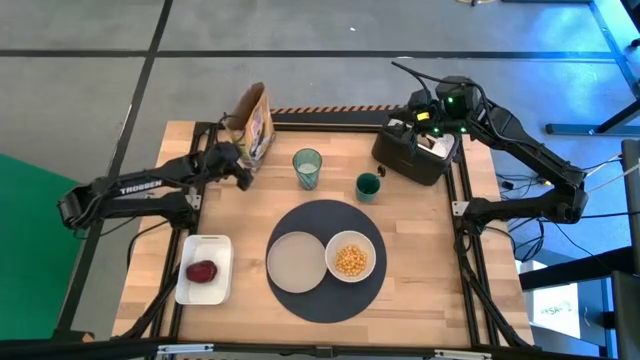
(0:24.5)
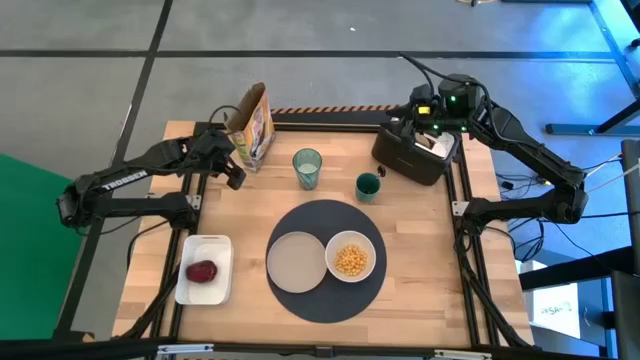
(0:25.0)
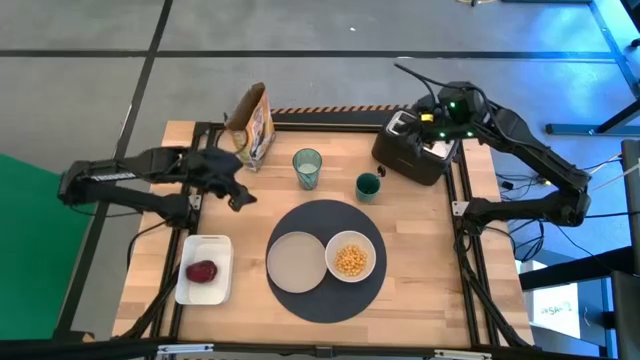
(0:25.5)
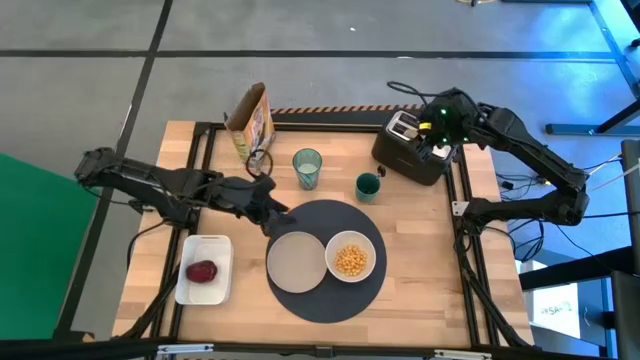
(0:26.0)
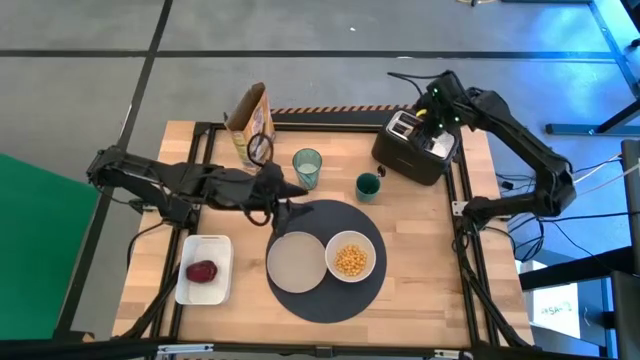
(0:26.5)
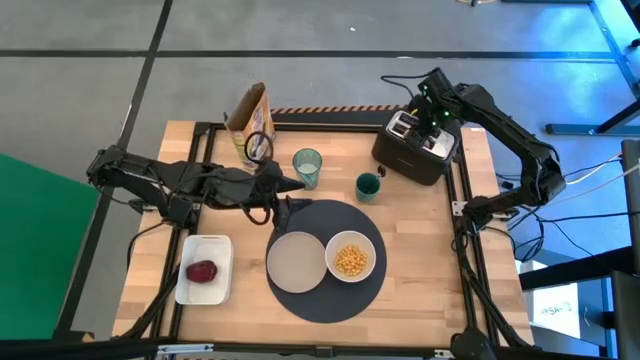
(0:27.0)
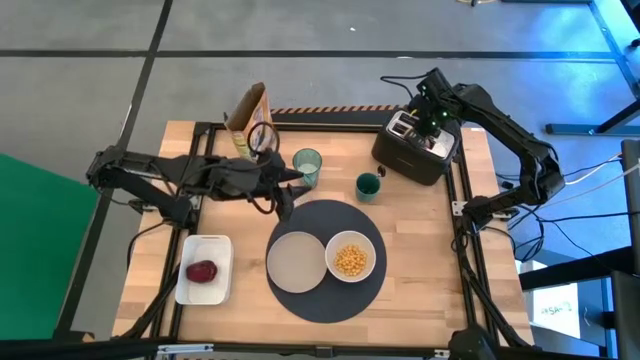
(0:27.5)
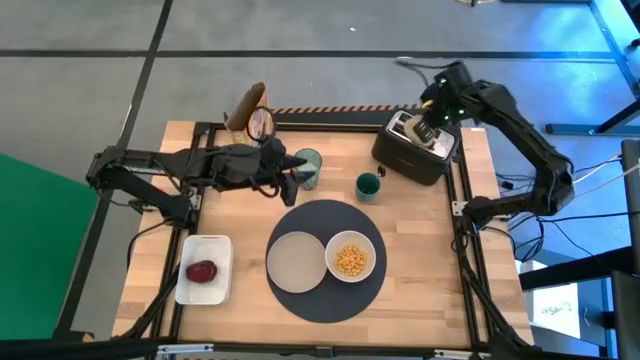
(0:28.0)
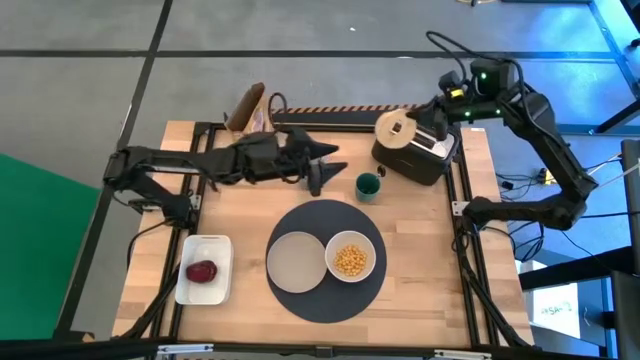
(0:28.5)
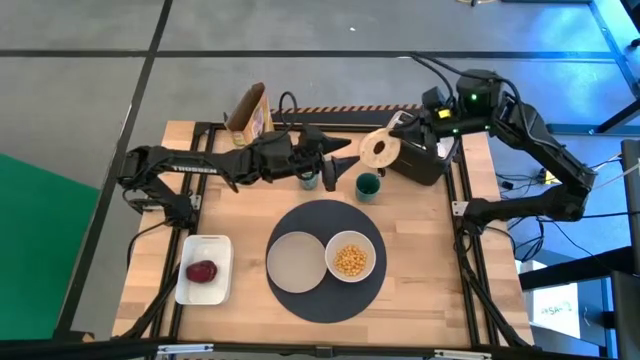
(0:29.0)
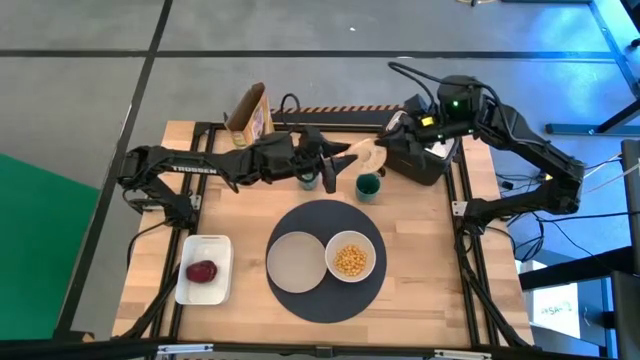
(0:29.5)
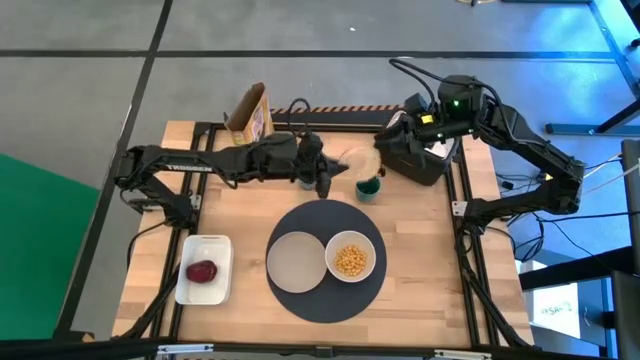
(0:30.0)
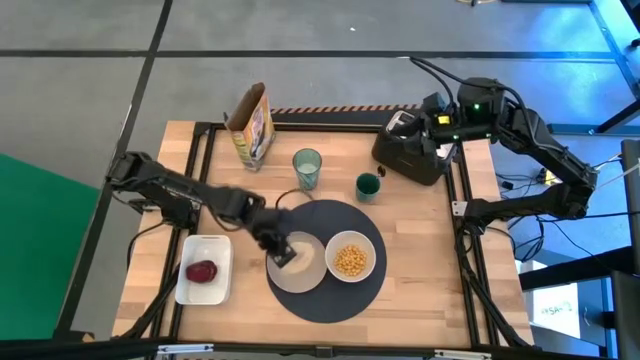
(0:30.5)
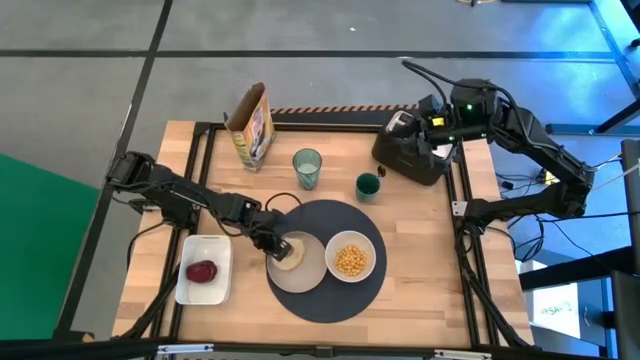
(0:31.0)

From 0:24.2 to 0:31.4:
Task: Arrange a breakfast setting
Put the bagel on the gray plate

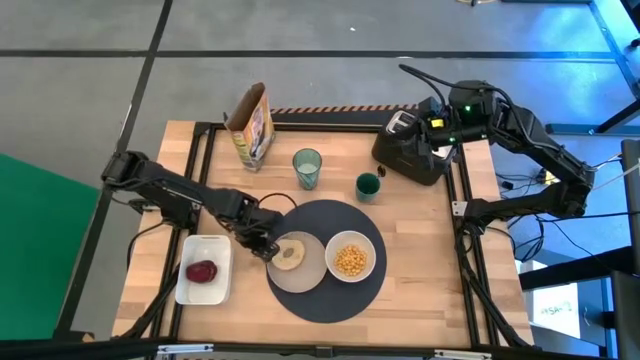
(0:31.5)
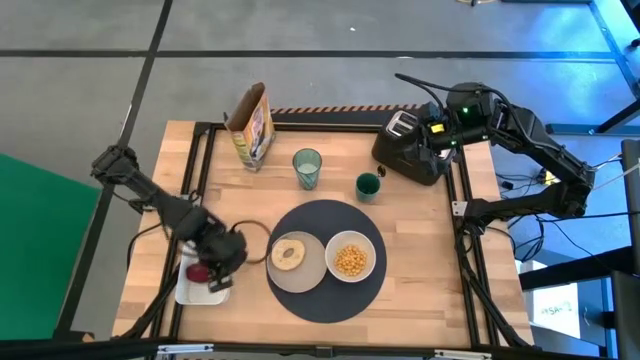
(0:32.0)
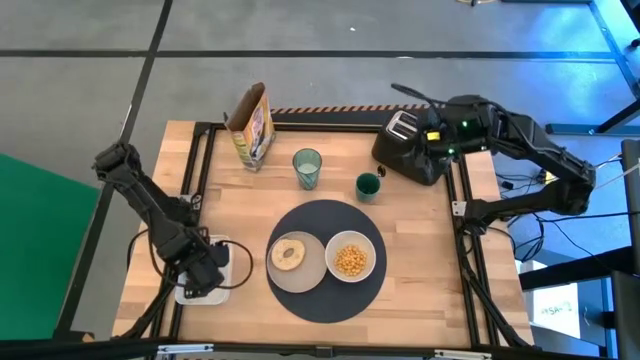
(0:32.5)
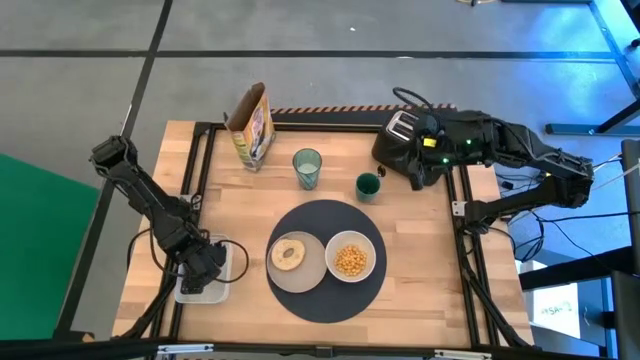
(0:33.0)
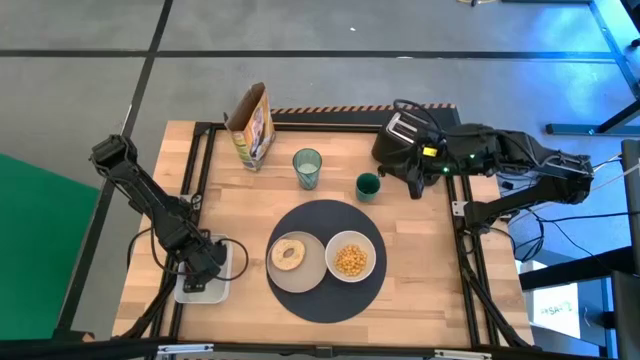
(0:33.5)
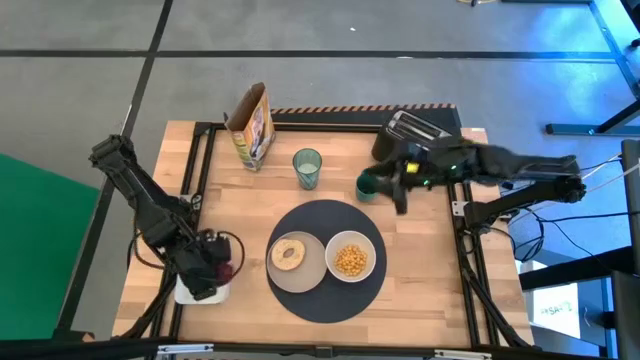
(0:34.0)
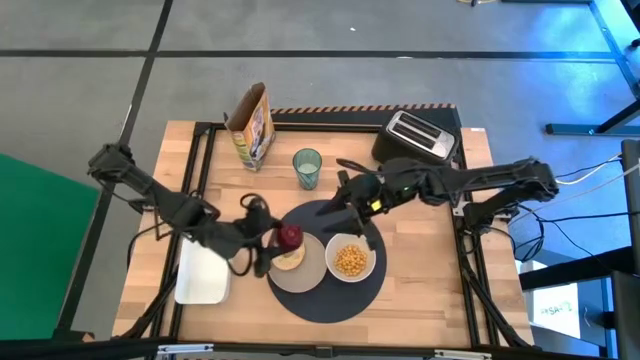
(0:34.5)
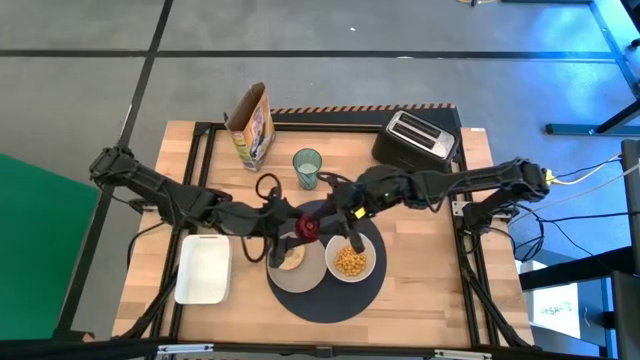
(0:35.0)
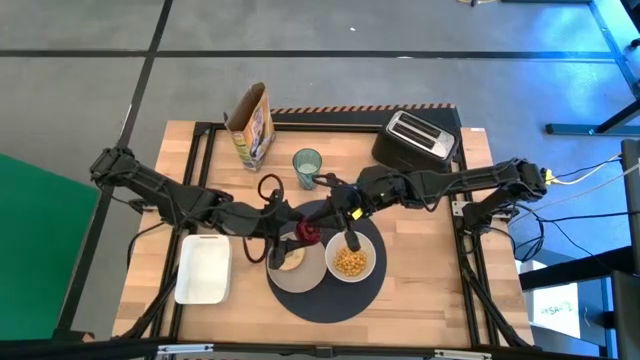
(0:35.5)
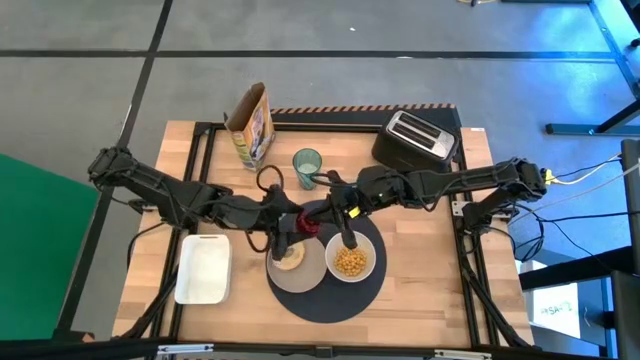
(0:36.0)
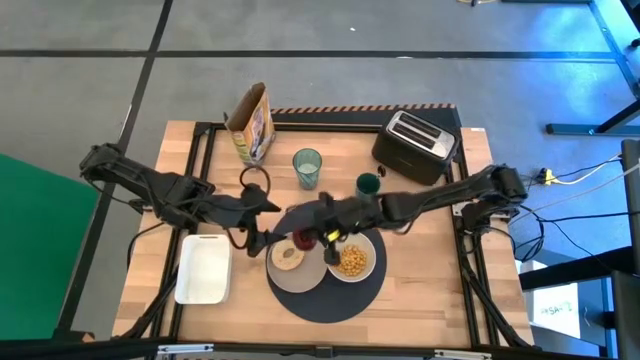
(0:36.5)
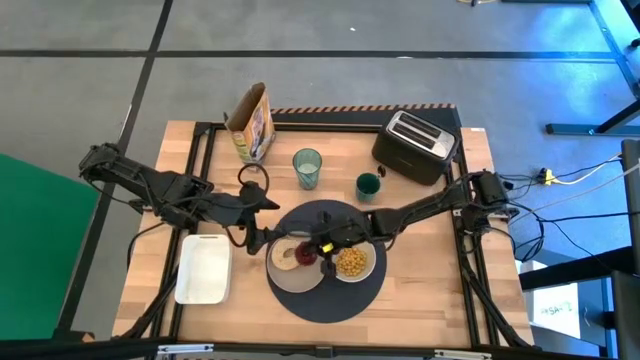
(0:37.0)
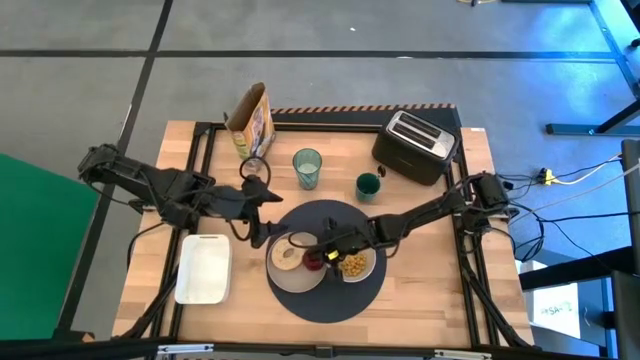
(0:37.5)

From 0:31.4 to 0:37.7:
Put the apple on the gray plate

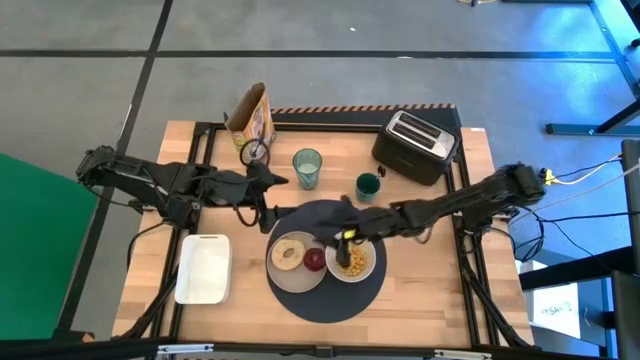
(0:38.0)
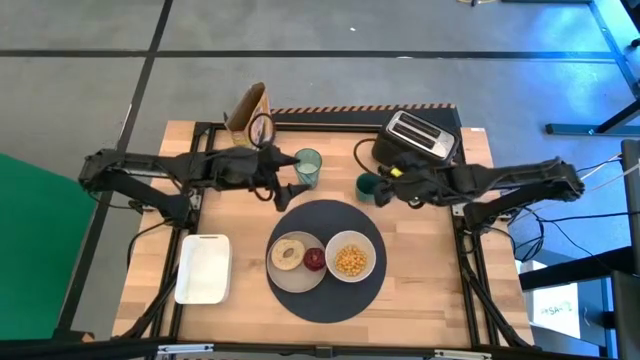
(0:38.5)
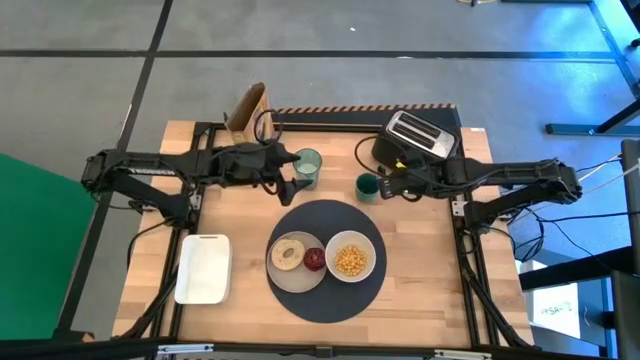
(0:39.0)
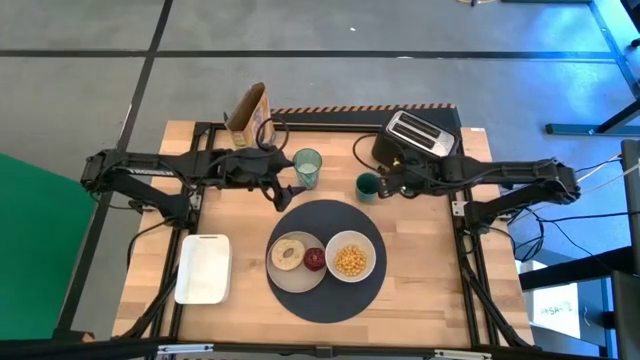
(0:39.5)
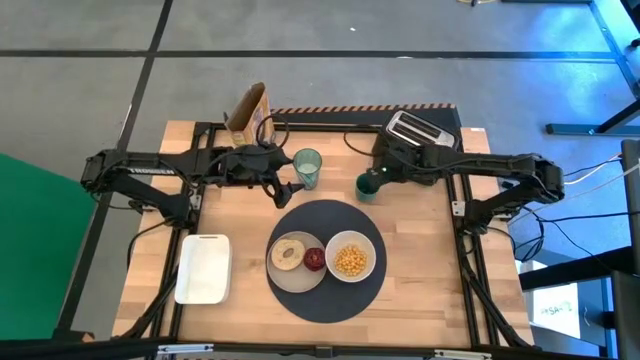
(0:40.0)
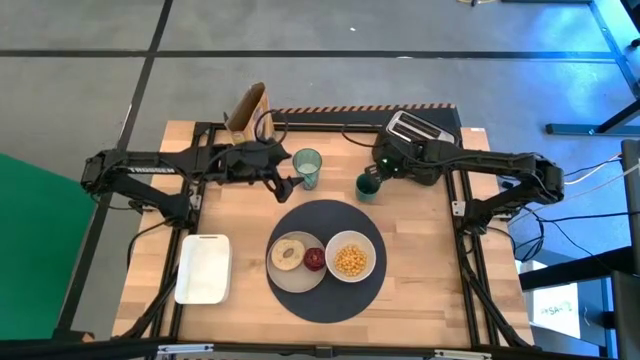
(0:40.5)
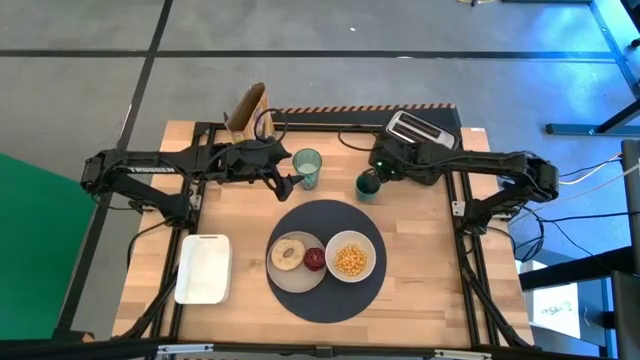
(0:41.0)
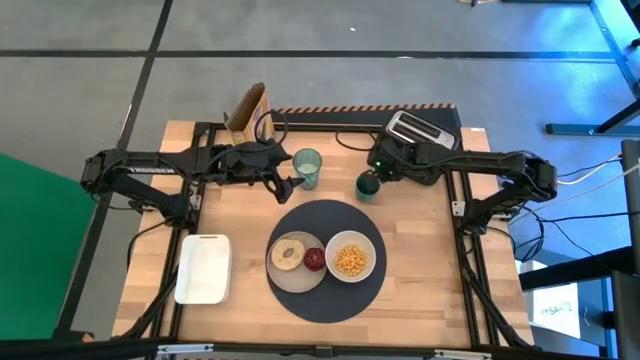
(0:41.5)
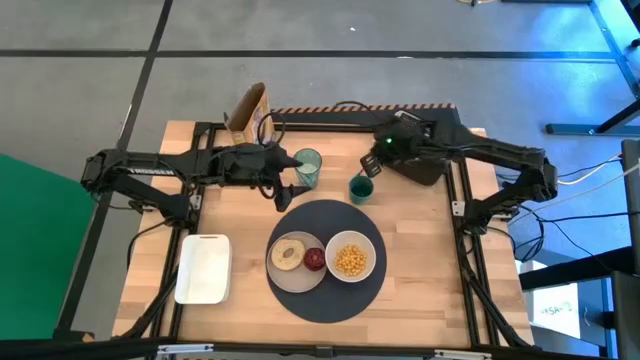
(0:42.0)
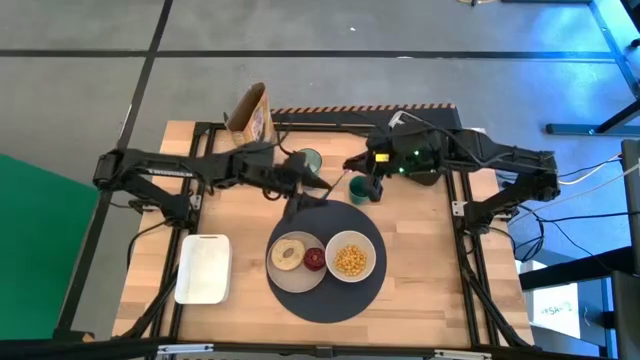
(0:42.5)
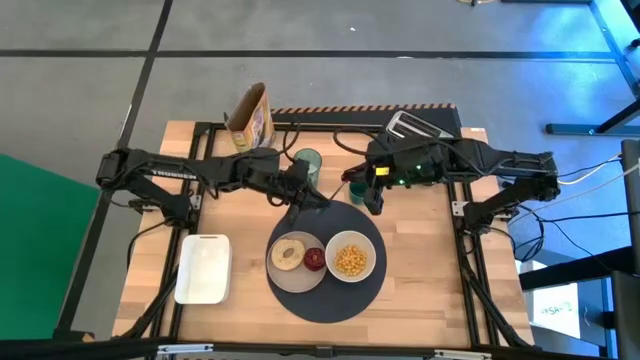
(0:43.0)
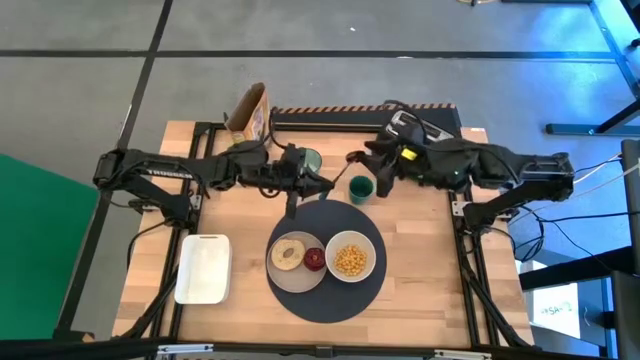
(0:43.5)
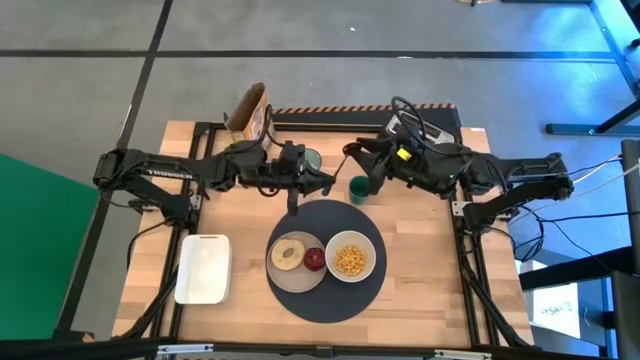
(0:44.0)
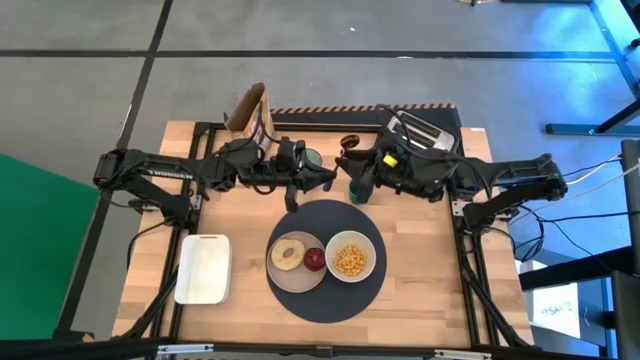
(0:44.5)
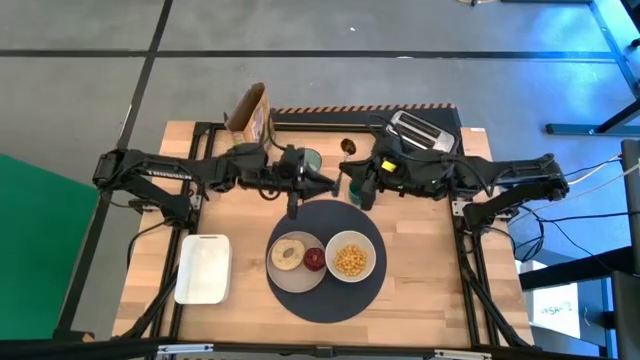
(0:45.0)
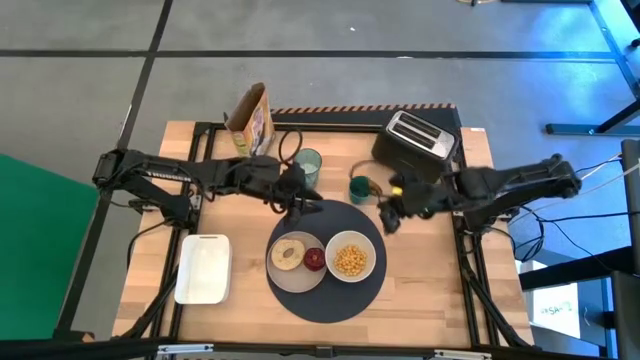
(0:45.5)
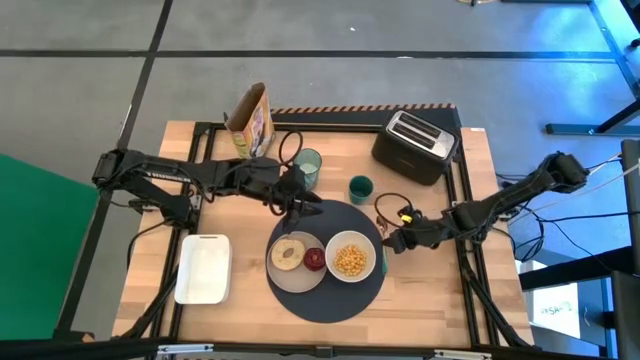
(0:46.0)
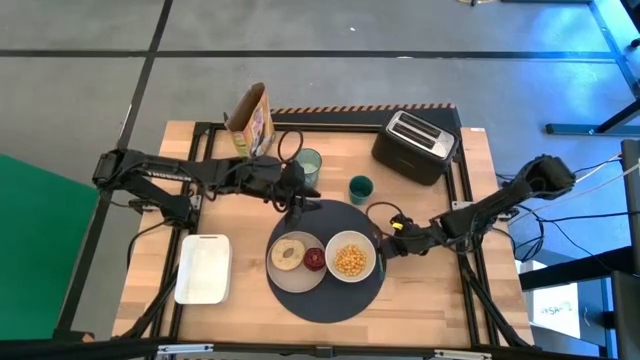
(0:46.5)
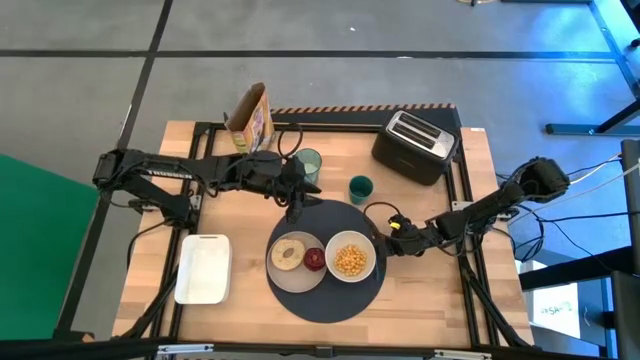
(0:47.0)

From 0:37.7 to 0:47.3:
Put the blue spoon on the right side of the white bowl
